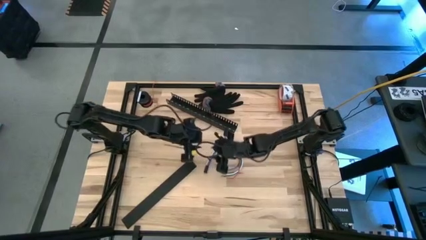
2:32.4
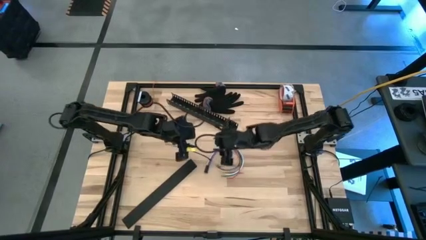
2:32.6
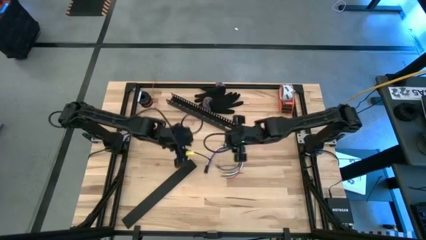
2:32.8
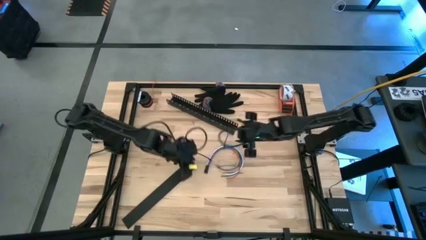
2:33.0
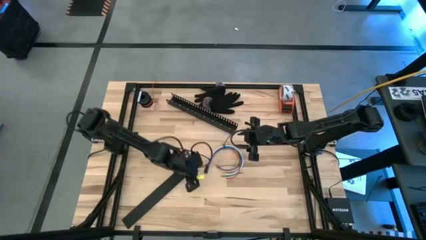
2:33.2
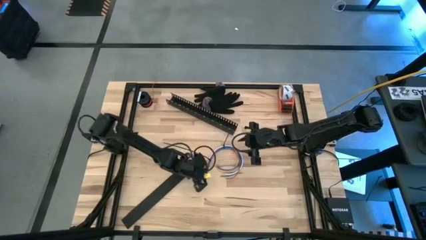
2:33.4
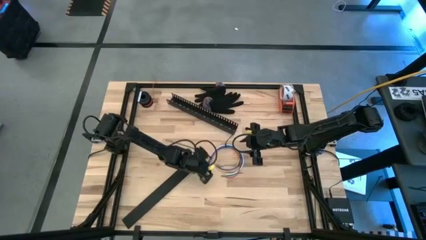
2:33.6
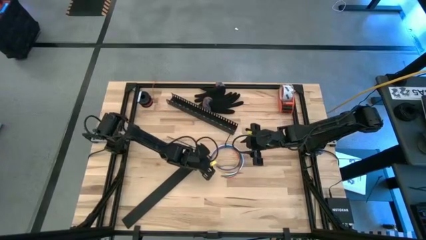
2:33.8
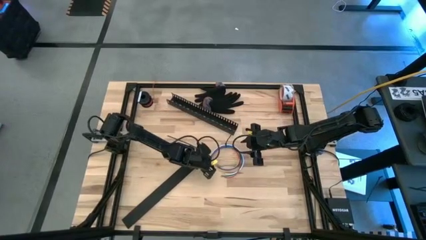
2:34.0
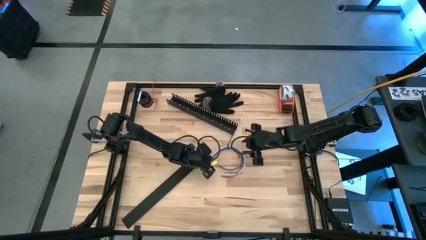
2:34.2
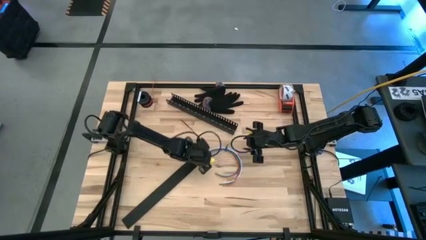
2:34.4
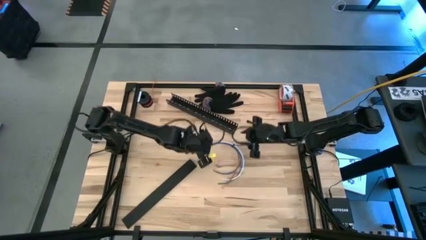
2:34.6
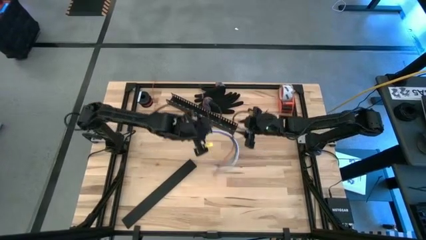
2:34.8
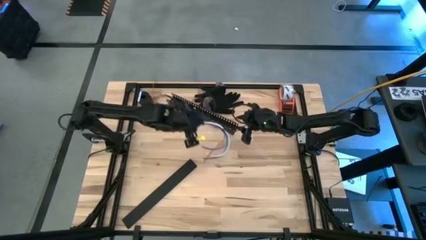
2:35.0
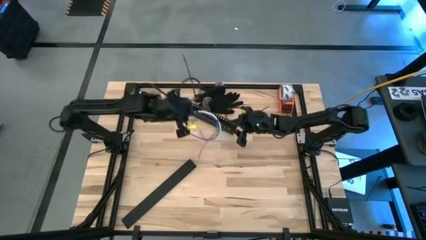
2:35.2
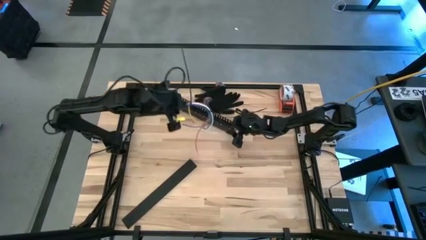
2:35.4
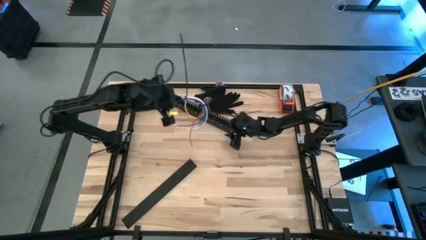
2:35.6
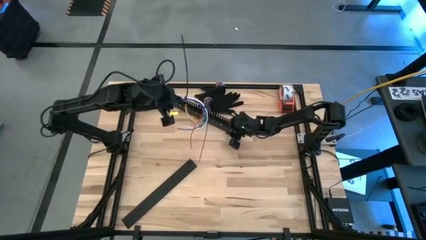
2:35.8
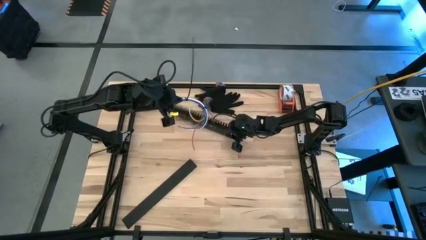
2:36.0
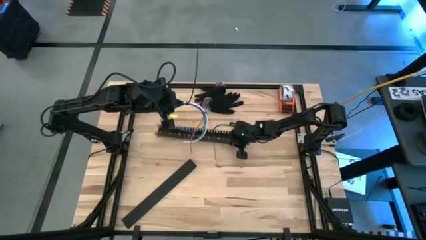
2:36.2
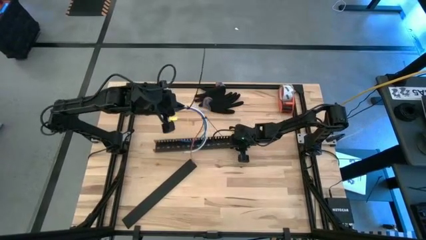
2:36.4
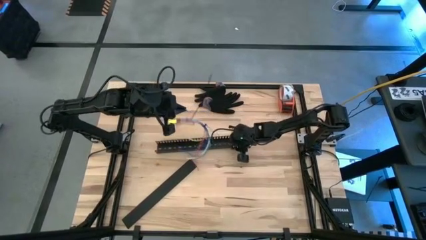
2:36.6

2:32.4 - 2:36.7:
Task: Ziptie cables
Put the ziptied cable wires in a black cable duct

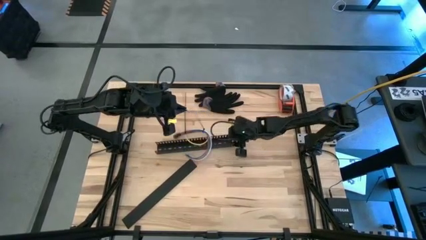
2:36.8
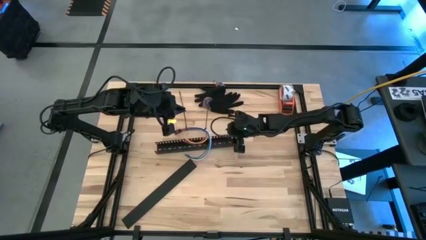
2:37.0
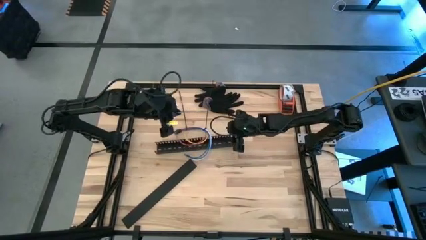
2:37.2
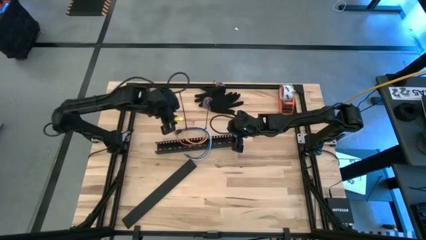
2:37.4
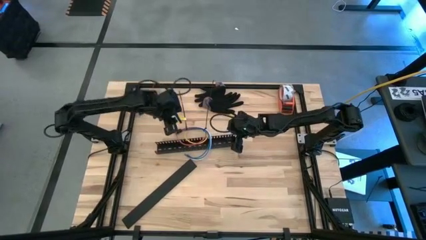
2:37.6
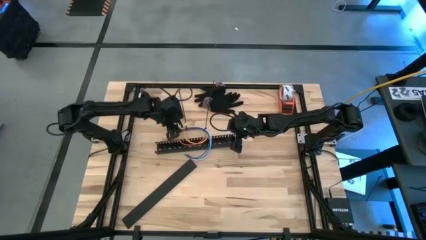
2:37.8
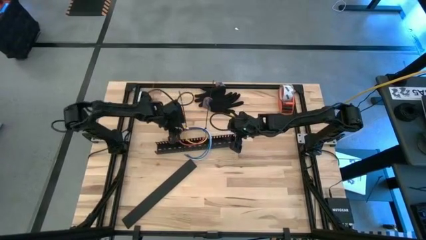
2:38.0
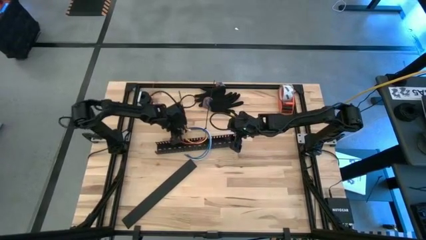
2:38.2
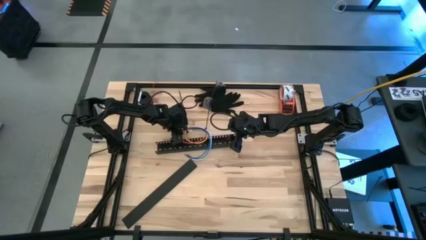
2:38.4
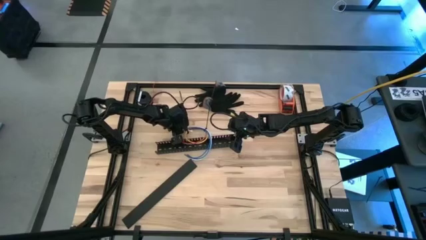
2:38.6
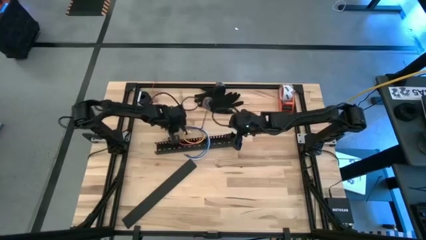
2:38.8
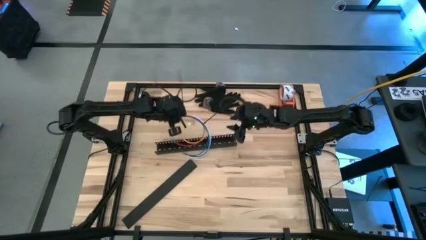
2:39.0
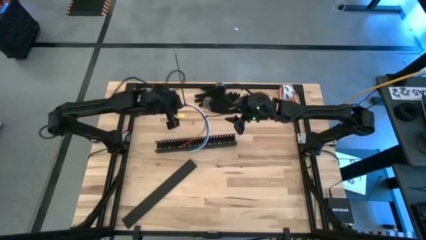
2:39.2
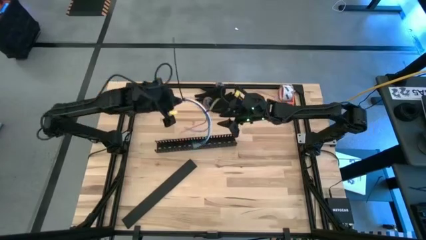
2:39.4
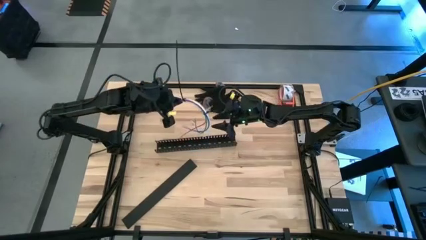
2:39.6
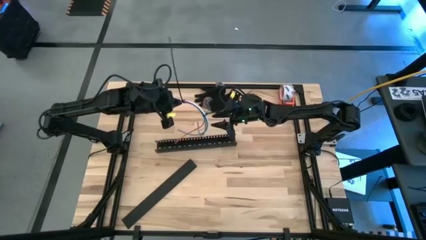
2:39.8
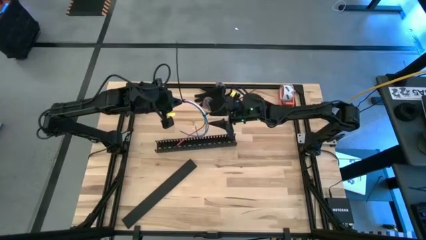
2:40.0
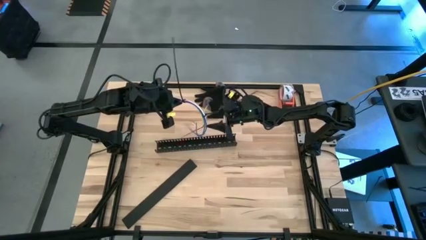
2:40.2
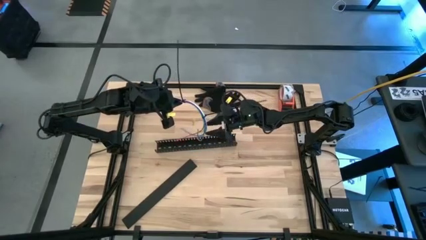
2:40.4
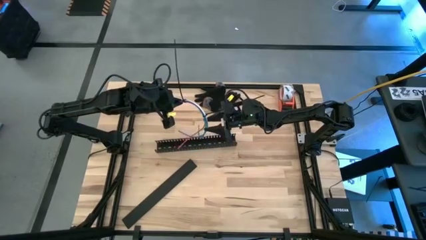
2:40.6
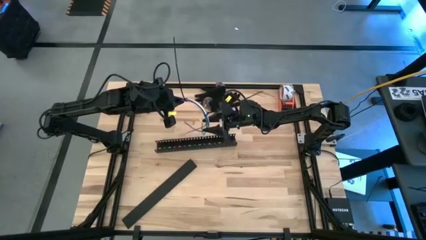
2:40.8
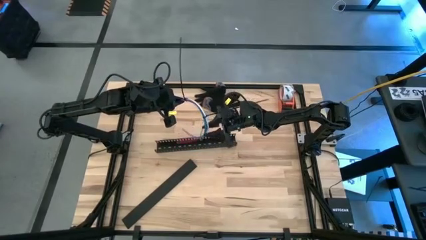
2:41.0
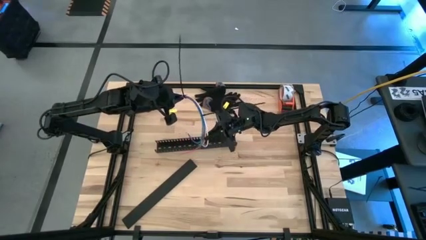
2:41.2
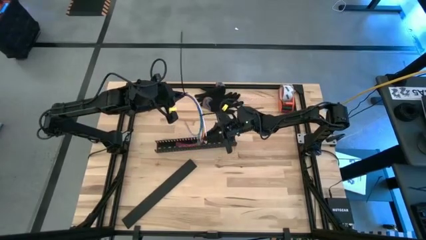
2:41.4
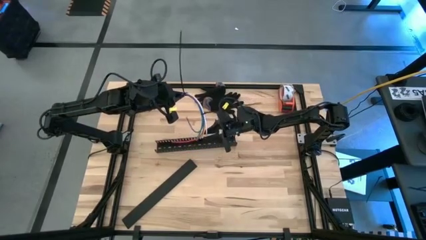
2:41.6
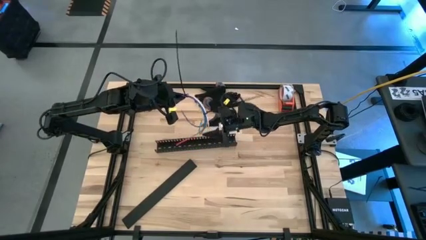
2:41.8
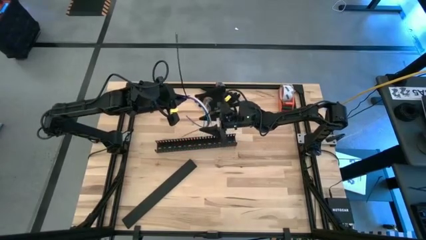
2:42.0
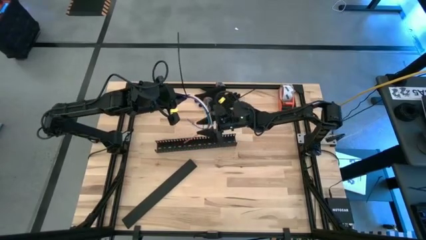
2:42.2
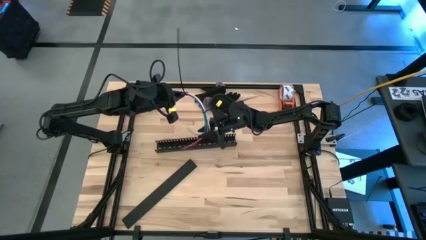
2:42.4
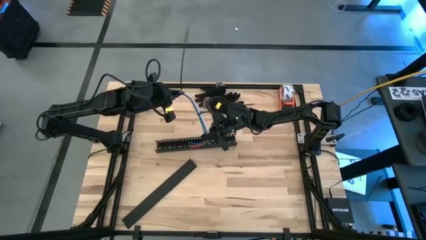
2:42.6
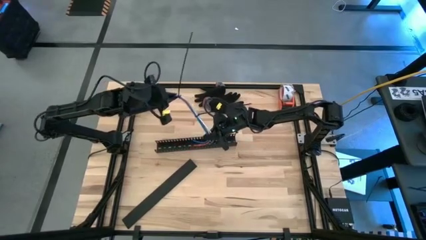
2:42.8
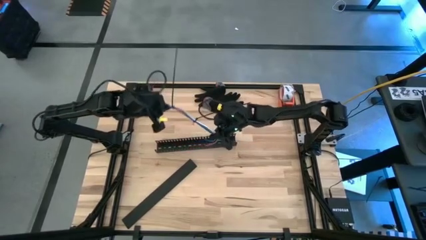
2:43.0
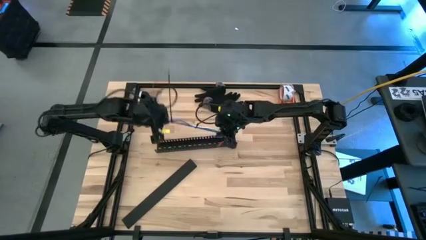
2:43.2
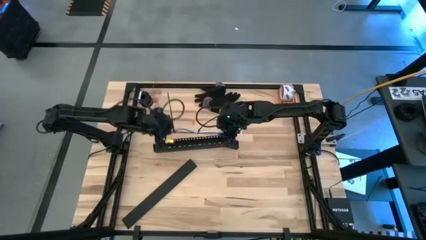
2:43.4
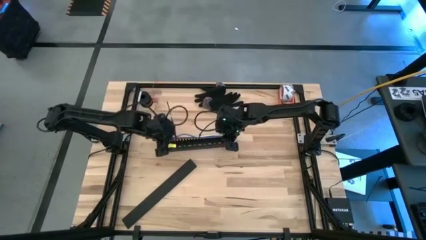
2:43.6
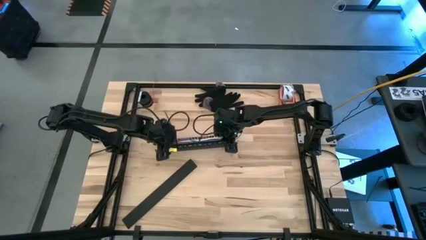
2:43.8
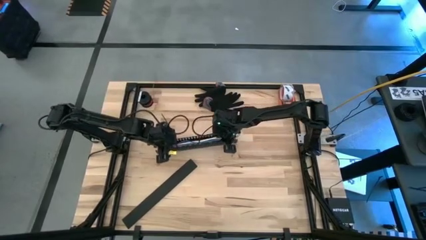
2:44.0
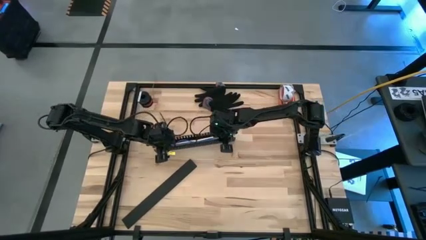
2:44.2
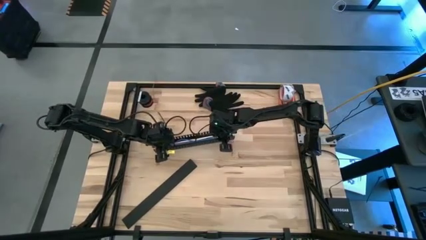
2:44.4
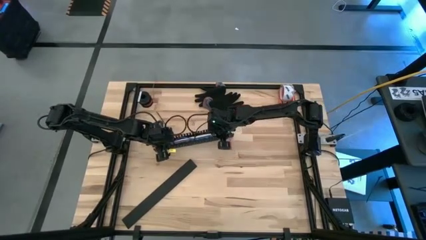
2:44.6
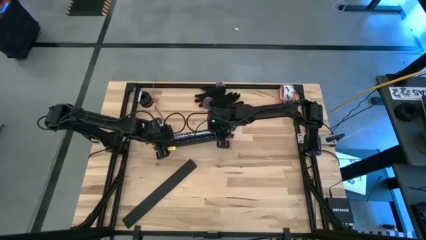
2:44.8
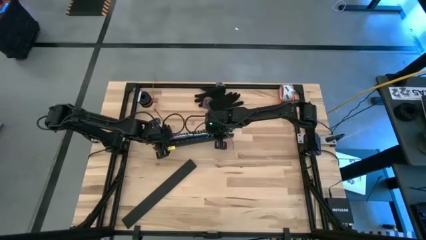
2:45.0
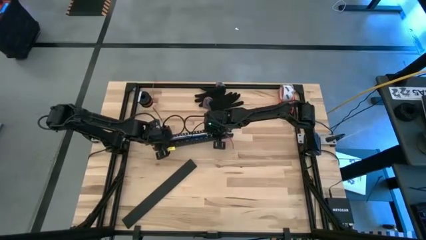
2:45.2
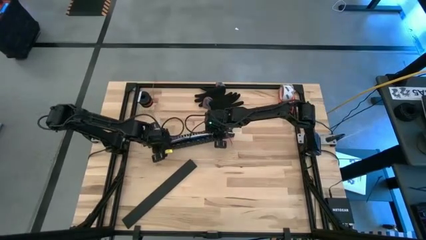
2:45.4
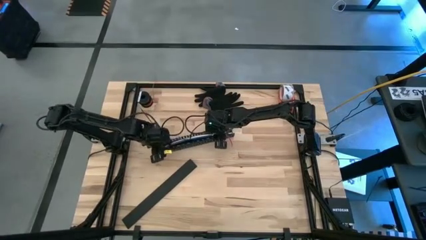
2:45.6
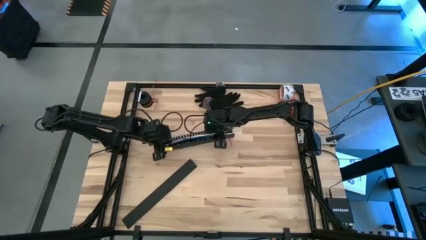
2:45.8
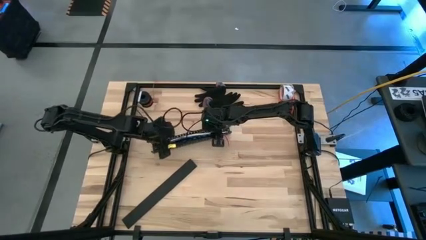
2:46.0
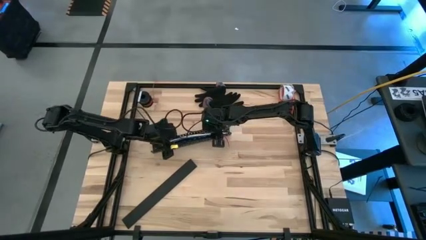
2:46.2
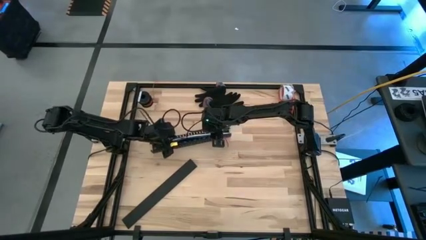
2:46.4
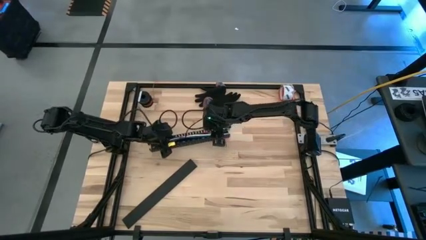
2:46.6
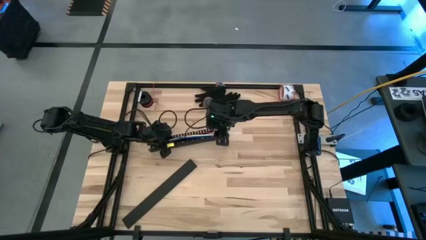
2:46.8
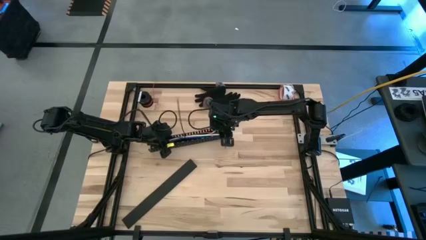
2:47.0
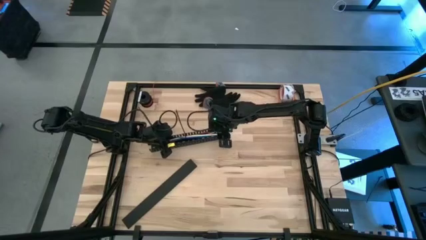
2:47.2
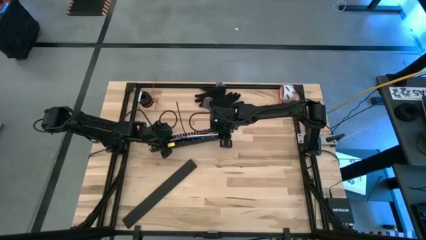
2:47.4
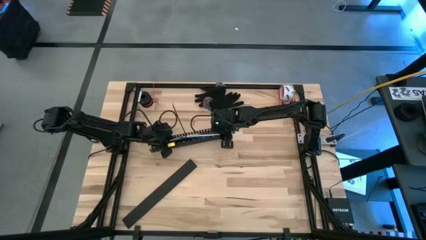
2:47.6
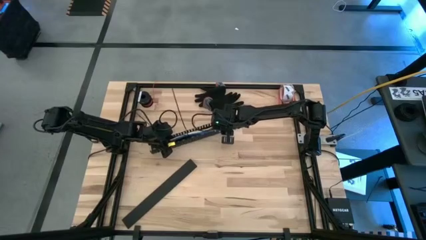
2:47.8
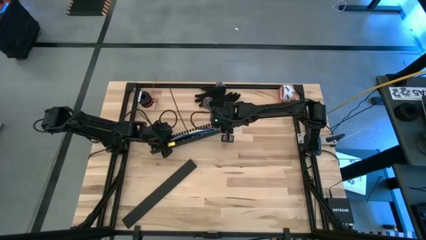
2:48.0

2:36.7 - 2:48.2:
Put the ziptied cable wires in a black cable duct
